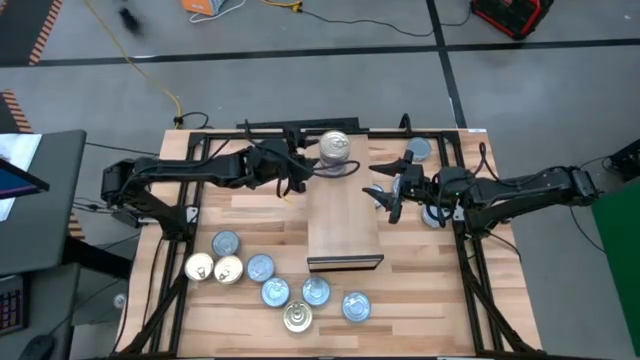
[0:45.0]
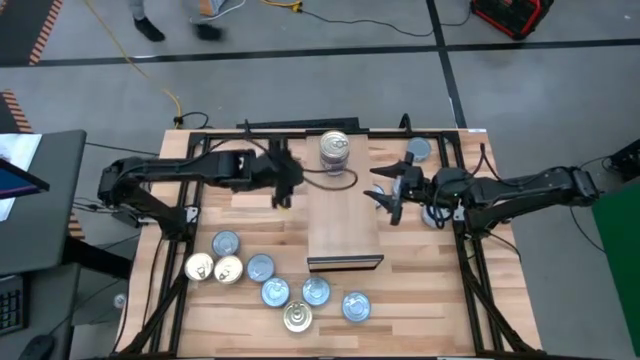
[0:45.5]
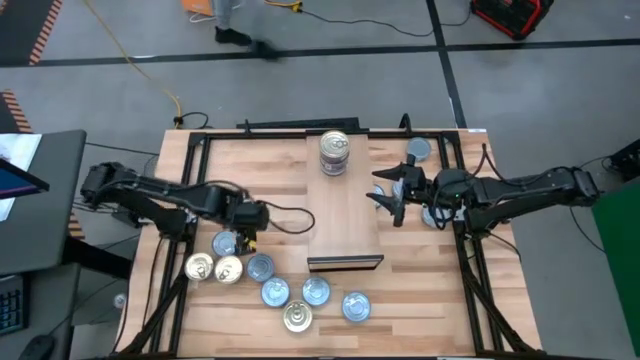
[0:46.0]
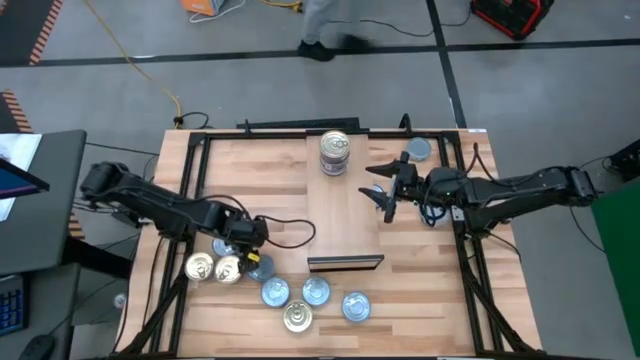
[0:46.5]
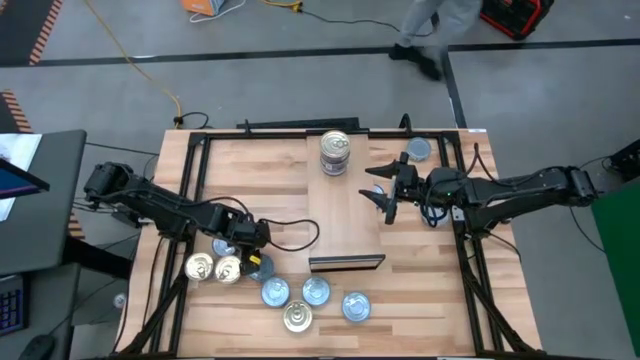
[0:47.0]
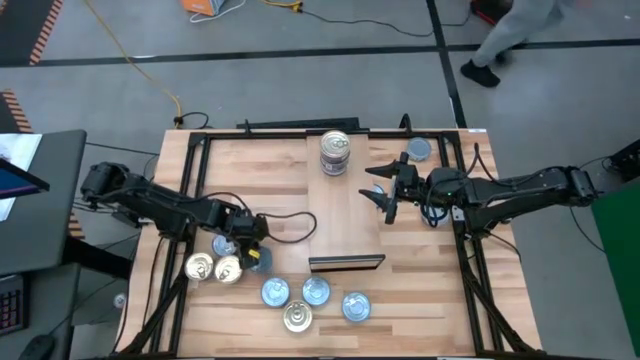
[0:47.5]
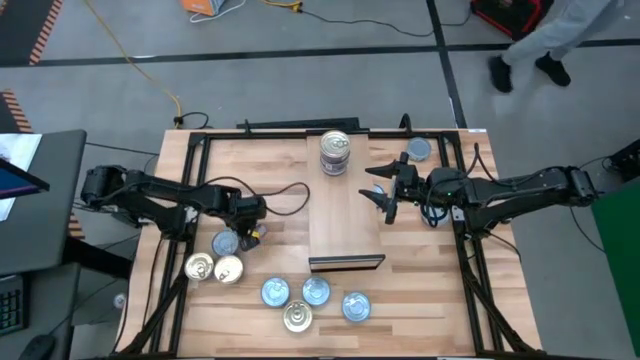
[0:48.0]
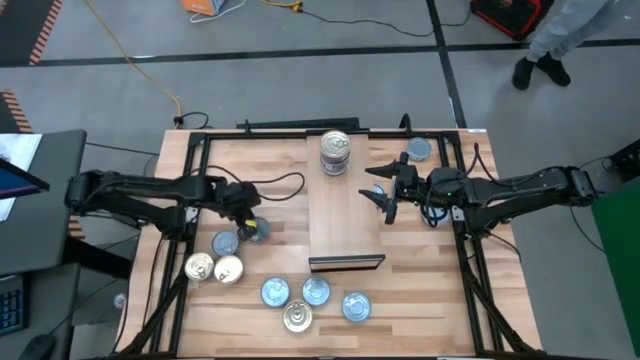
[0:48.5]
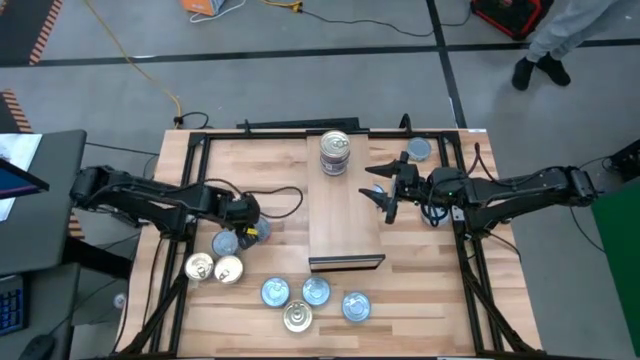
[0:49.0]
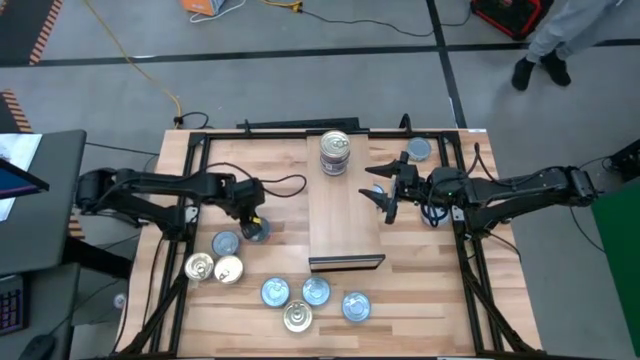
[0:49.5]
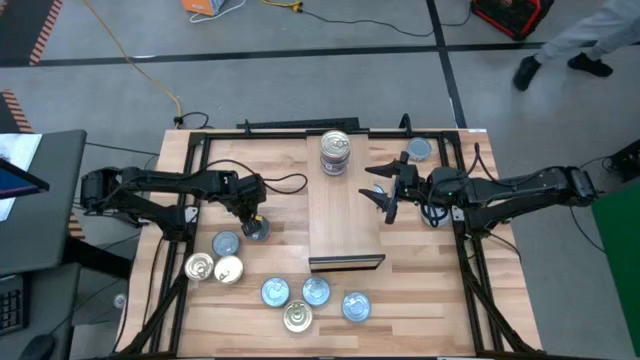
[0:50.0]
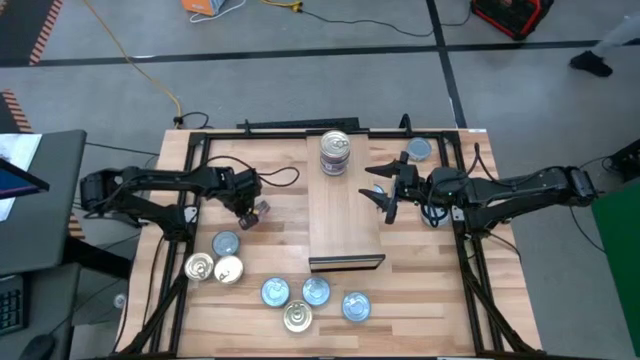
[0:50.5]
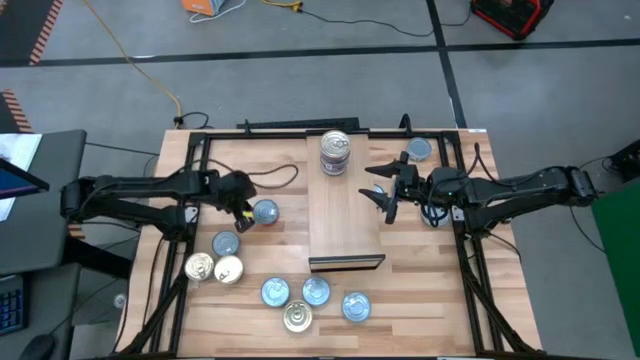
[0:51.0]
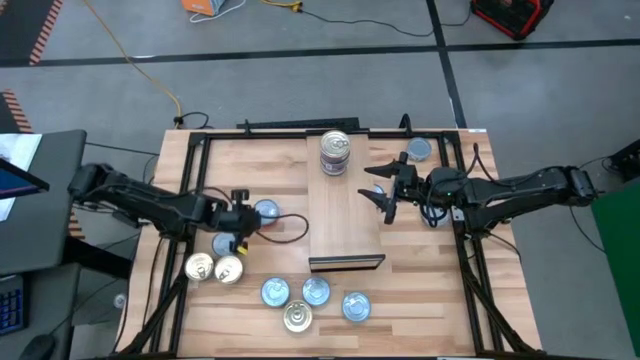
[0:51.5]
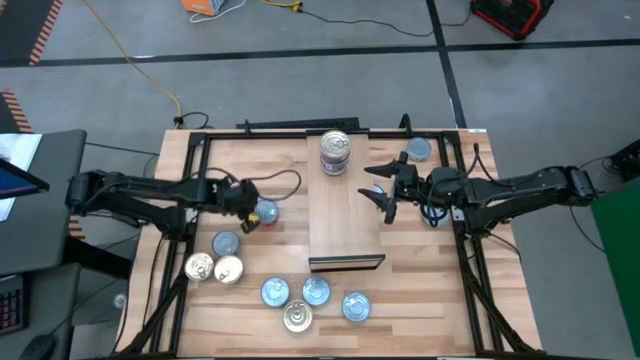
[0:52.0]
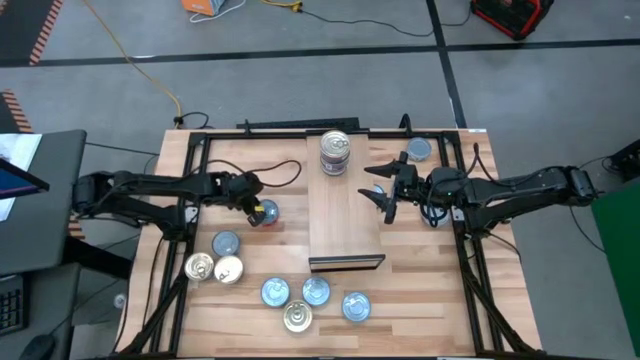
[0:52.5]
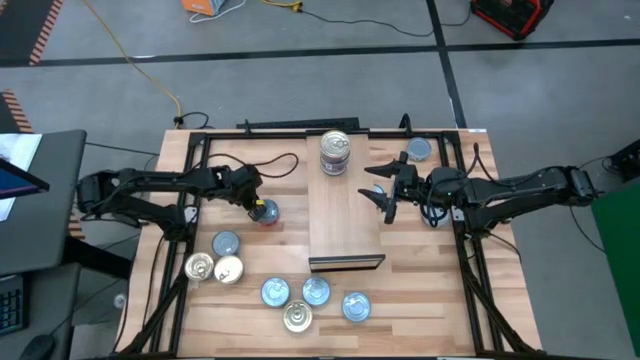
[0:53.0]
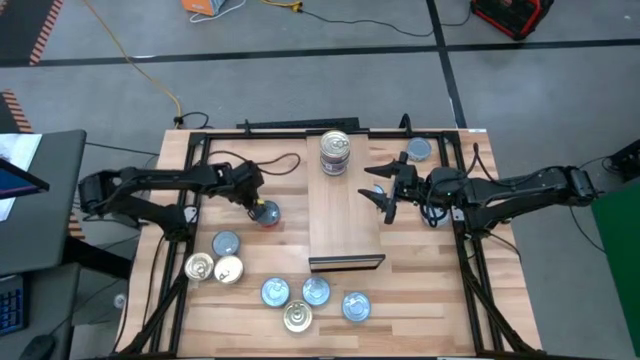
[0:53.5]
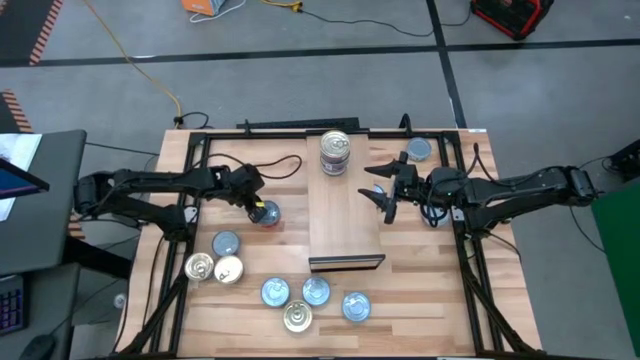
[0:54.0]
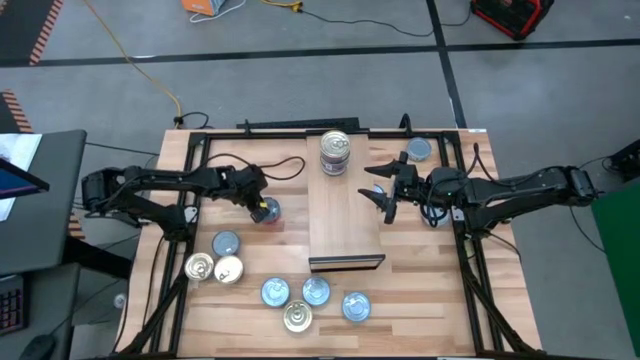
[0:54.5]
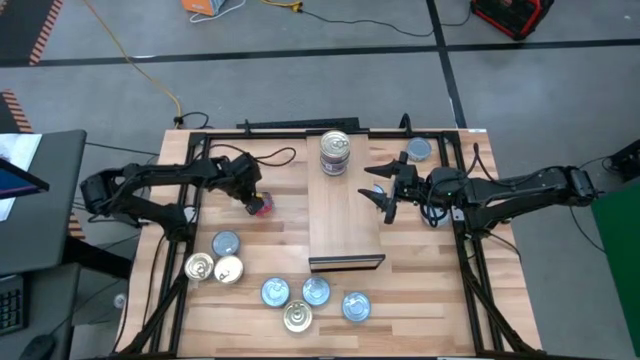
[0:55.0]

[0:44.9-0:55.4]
Task: Stack canned seafood by type on shelf
Put the red tuna can on the shelf

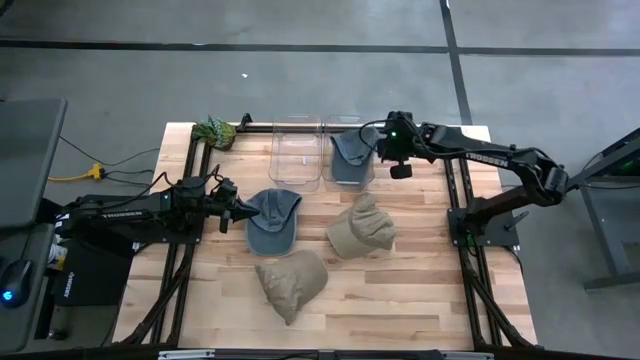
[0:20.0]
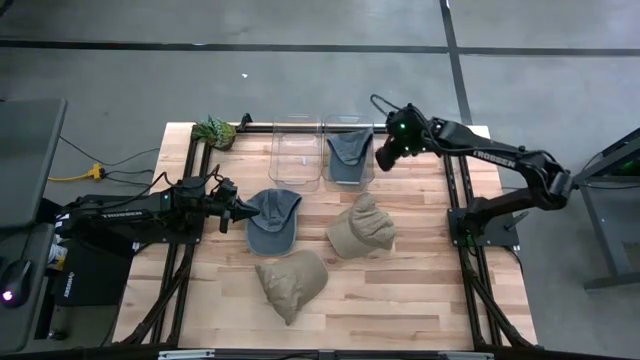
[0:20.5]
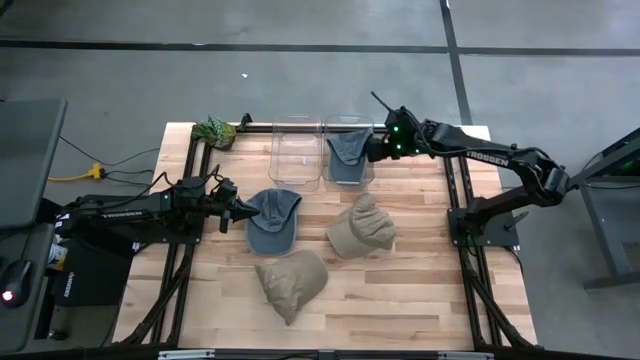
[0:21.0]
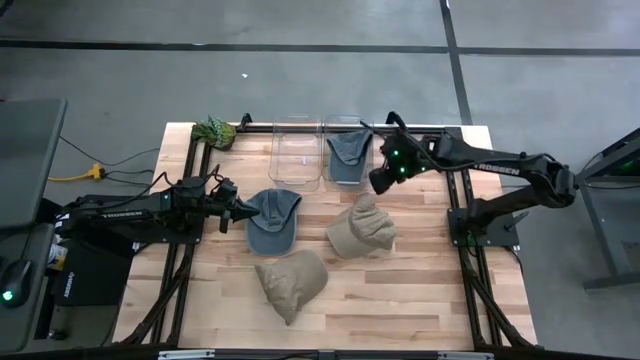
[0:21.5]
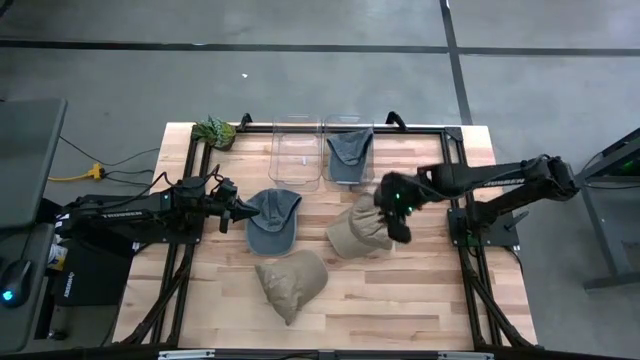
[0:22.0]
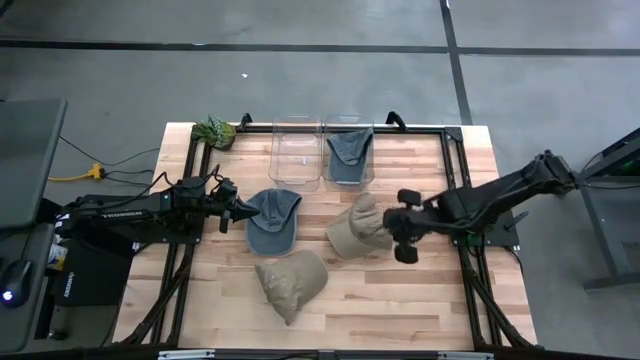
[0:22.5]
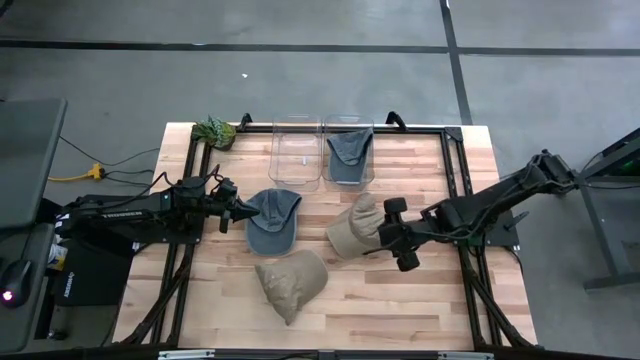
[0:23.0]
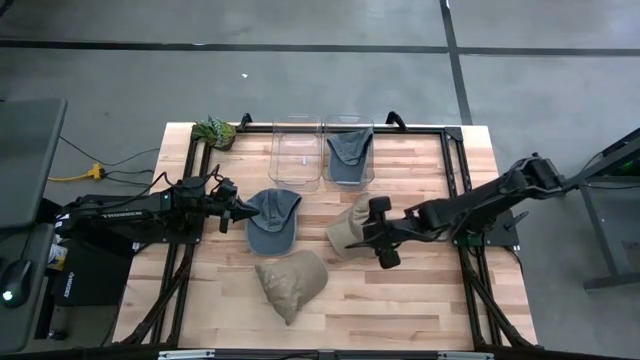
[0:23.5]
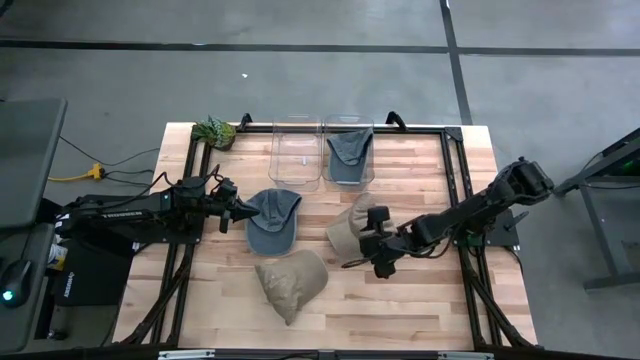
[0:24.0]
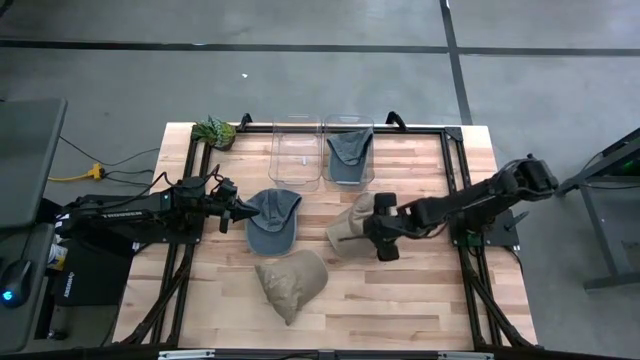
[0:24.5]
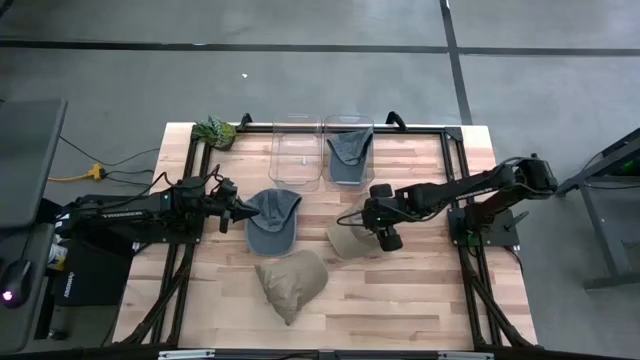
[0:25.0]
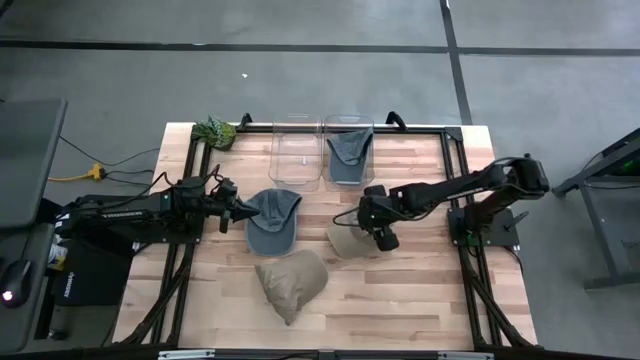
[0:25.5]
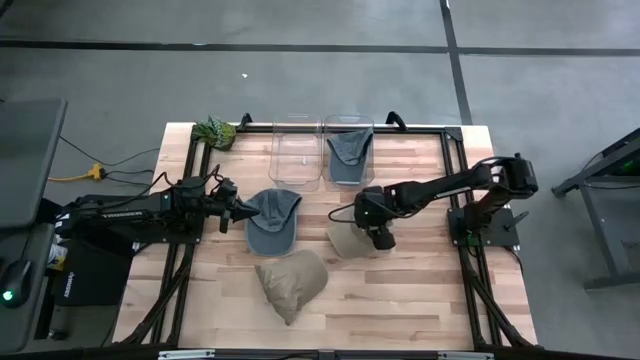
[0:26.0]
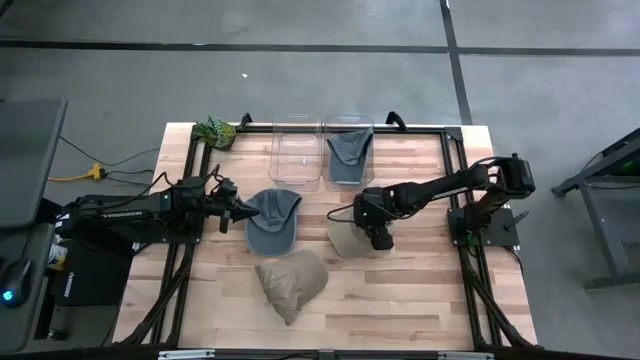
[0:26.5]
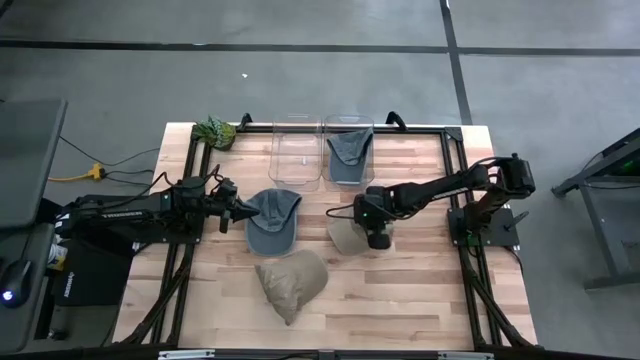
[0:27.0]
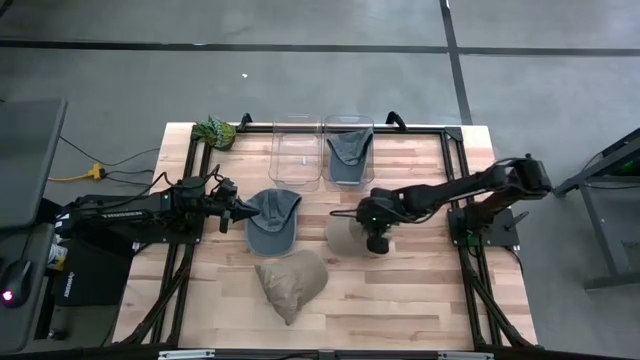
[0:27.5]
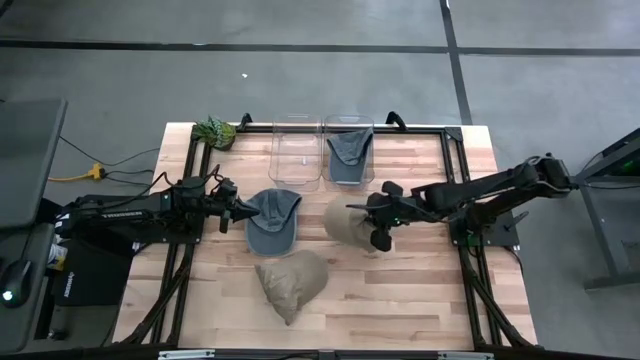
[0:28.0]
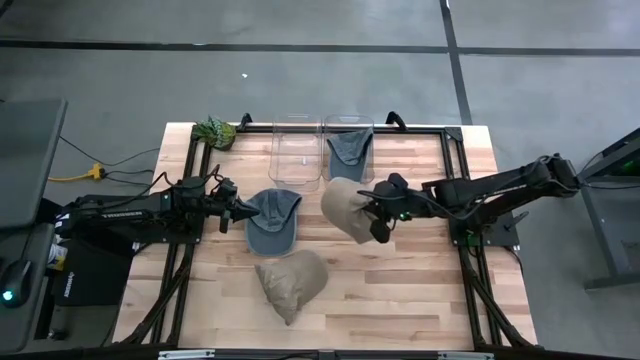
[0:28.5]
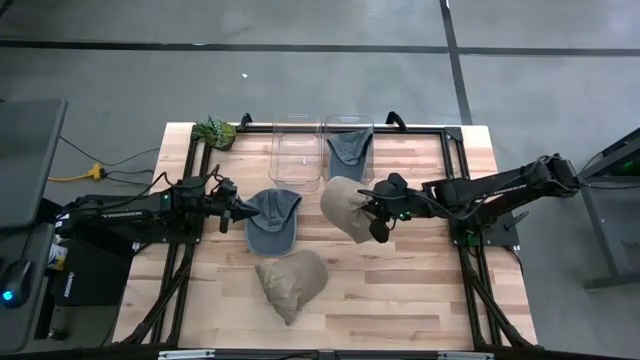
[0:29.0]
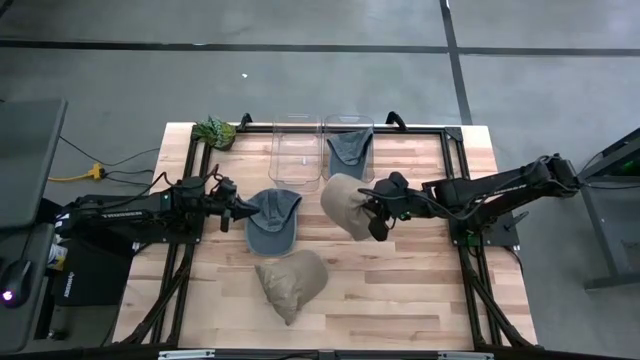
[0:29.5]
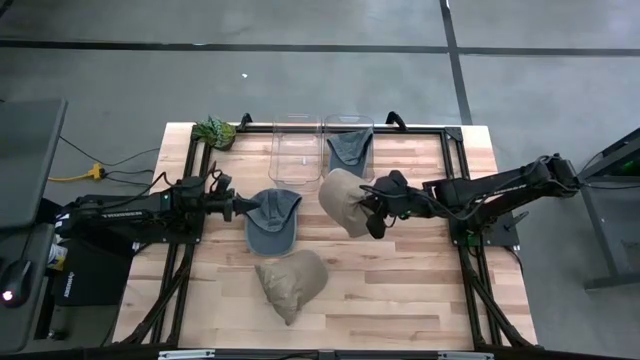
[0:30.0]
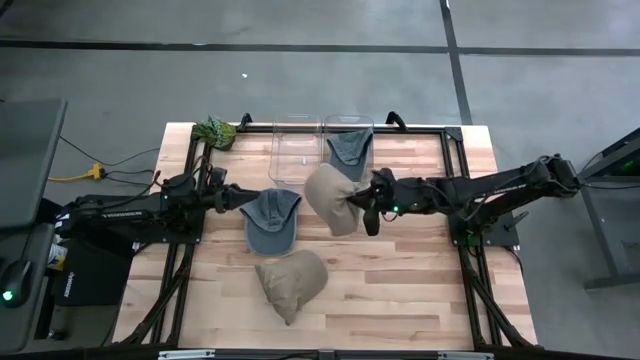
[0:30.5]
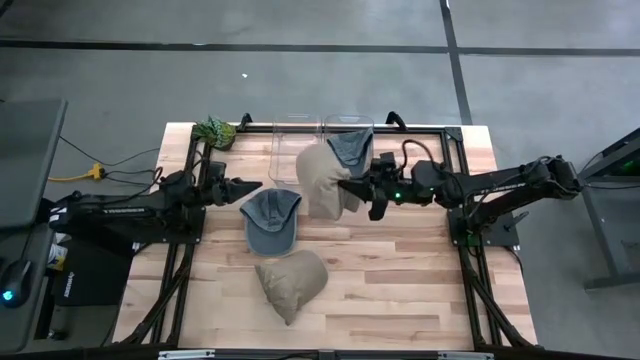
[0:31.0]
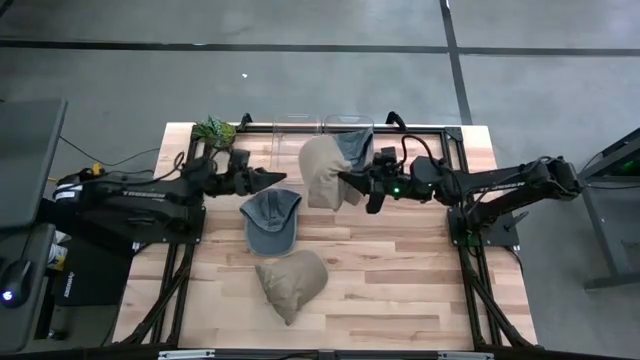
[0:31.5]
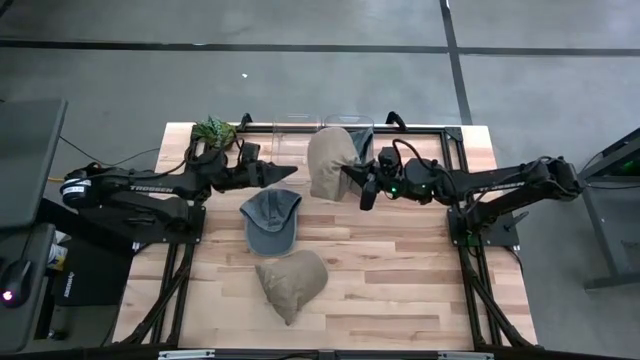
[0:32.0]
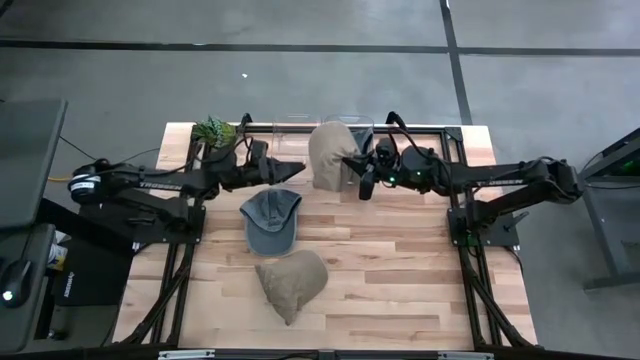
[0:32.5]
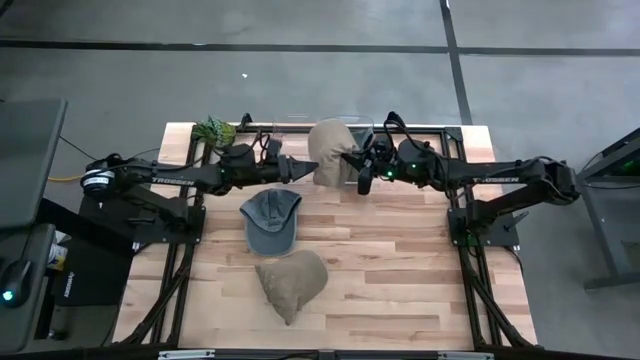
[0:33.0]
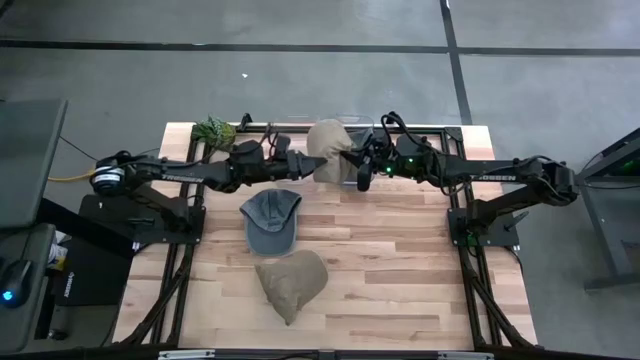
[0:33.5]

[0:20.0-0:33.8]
Task: Pick & Place hat
Put the top brown cap into the left transparent bin
